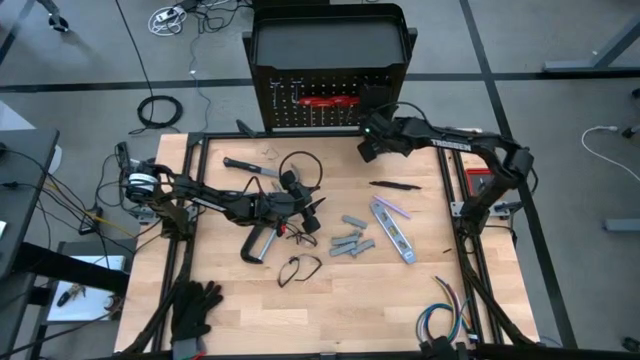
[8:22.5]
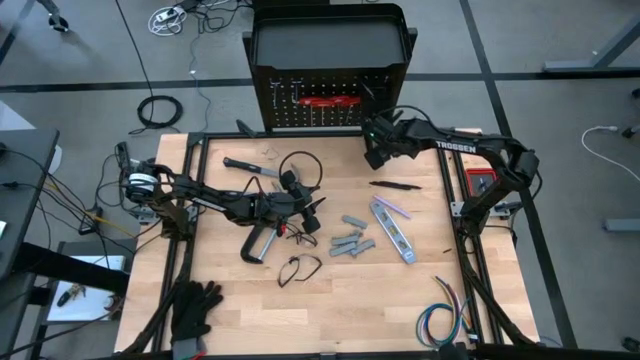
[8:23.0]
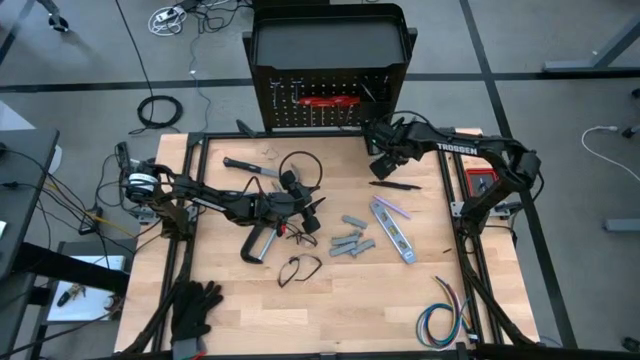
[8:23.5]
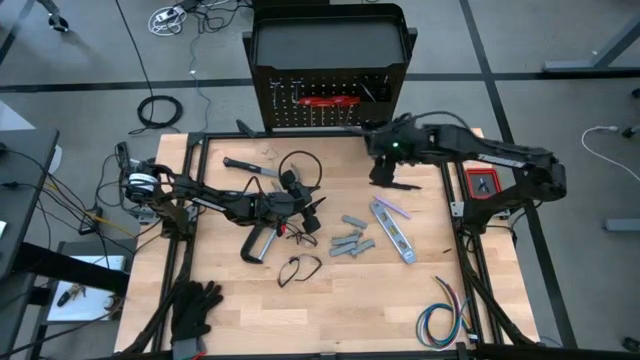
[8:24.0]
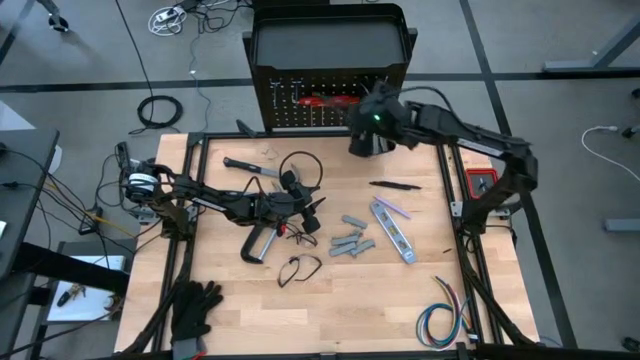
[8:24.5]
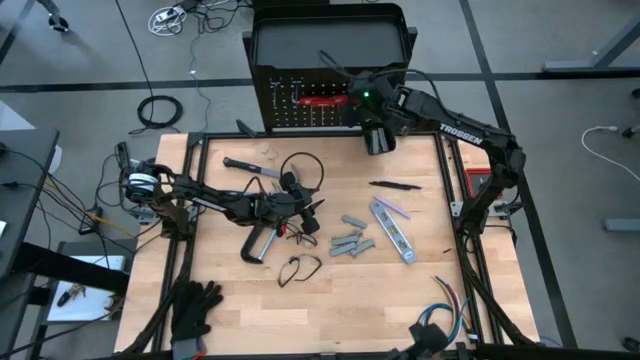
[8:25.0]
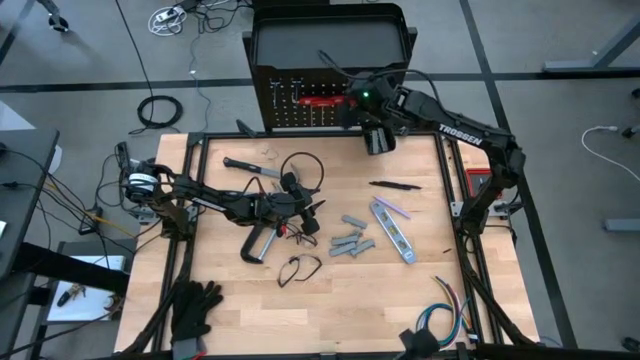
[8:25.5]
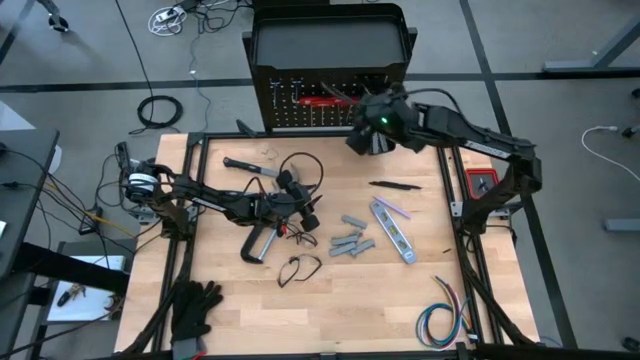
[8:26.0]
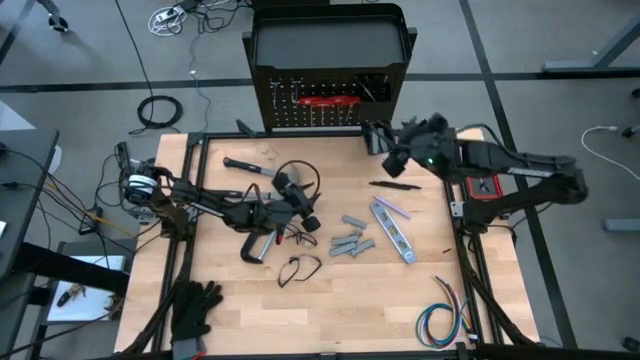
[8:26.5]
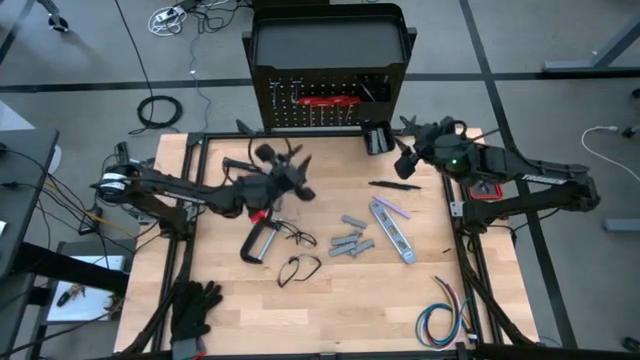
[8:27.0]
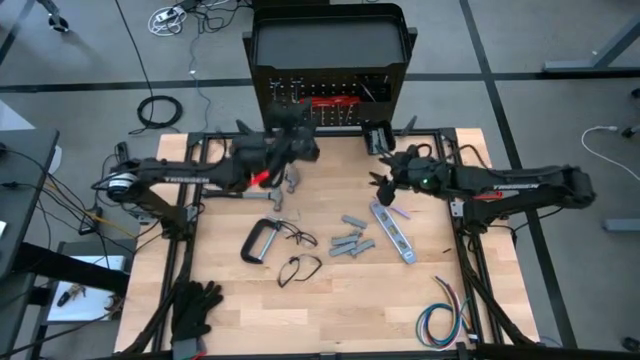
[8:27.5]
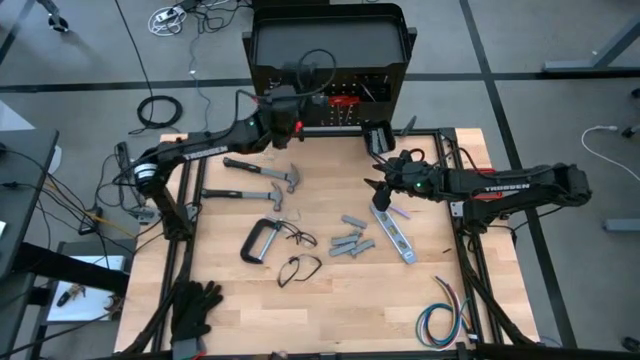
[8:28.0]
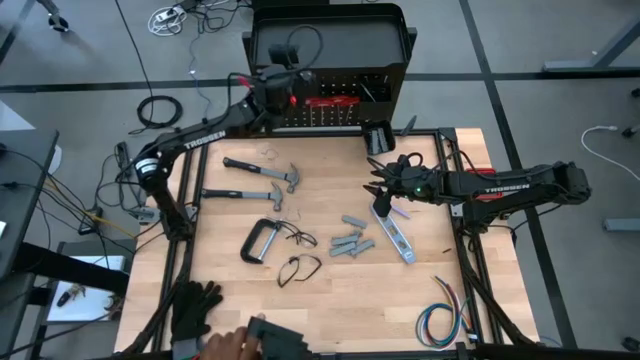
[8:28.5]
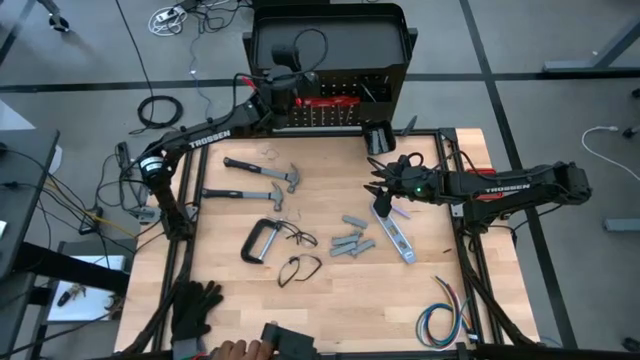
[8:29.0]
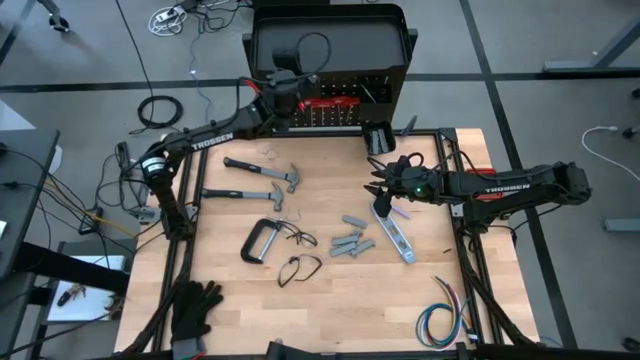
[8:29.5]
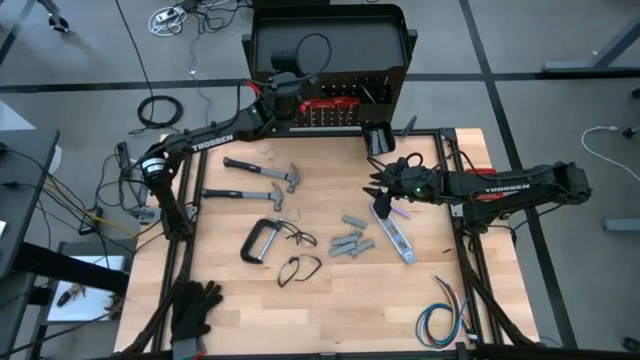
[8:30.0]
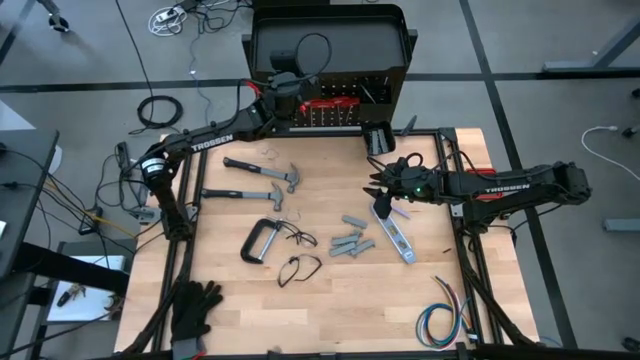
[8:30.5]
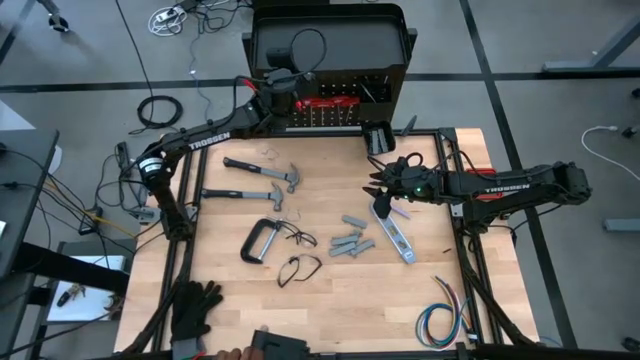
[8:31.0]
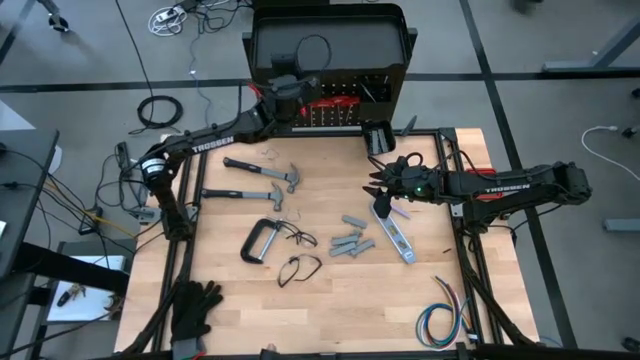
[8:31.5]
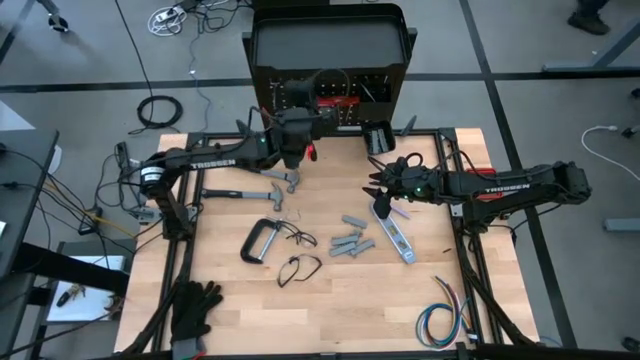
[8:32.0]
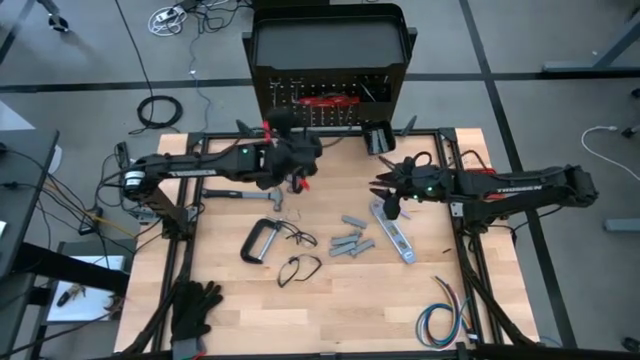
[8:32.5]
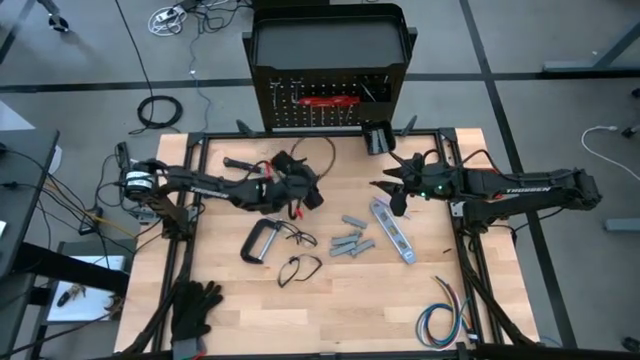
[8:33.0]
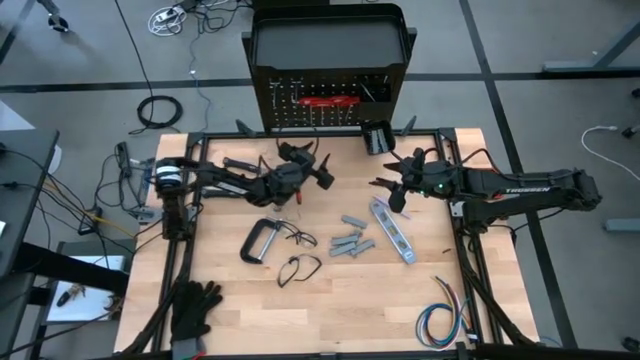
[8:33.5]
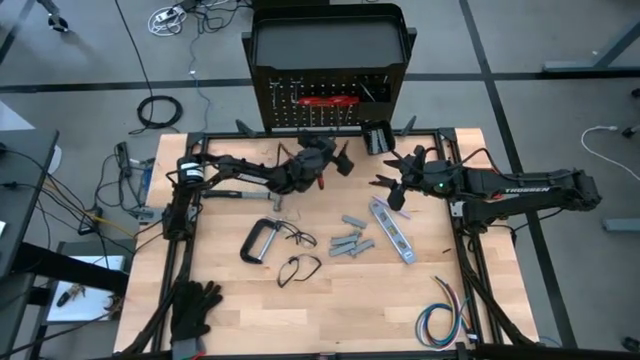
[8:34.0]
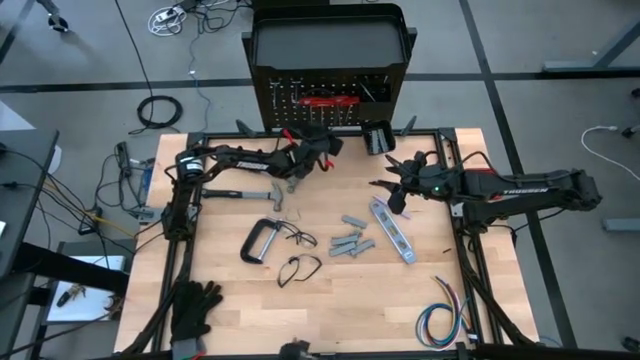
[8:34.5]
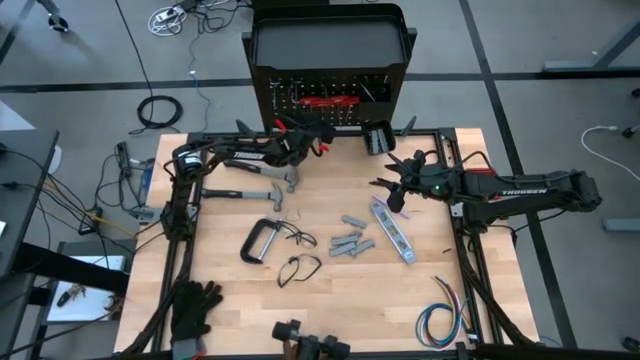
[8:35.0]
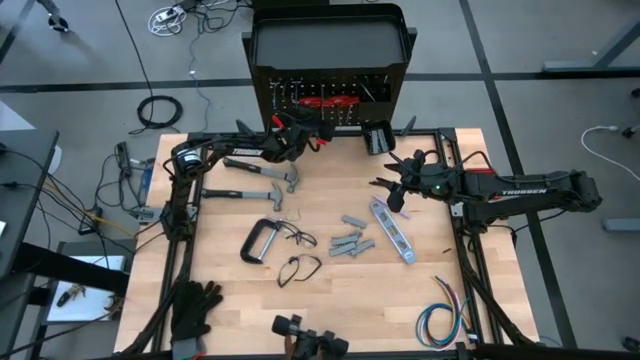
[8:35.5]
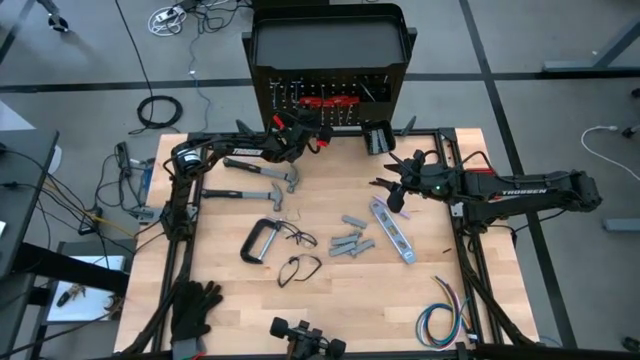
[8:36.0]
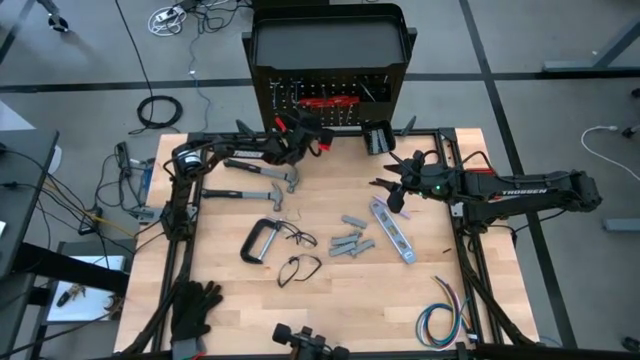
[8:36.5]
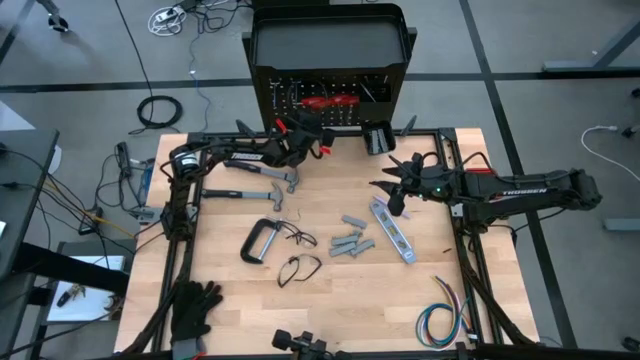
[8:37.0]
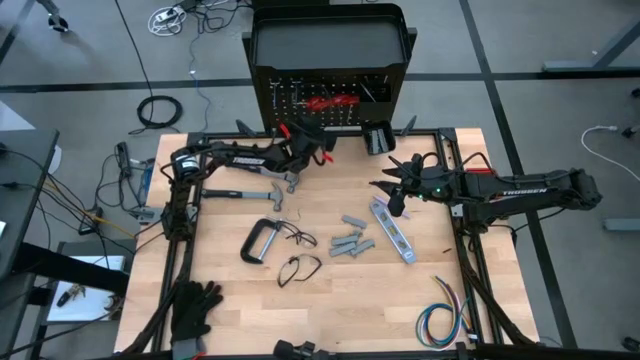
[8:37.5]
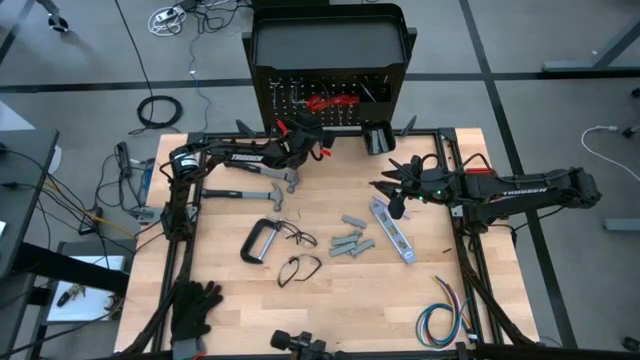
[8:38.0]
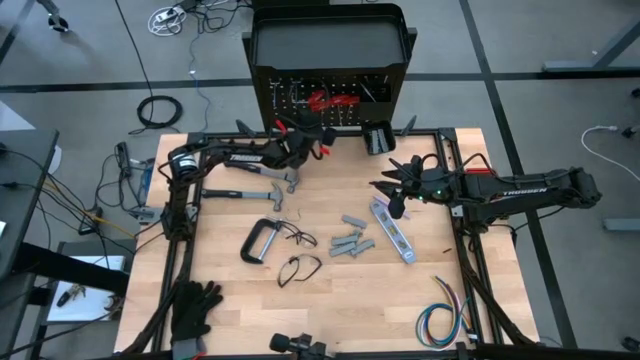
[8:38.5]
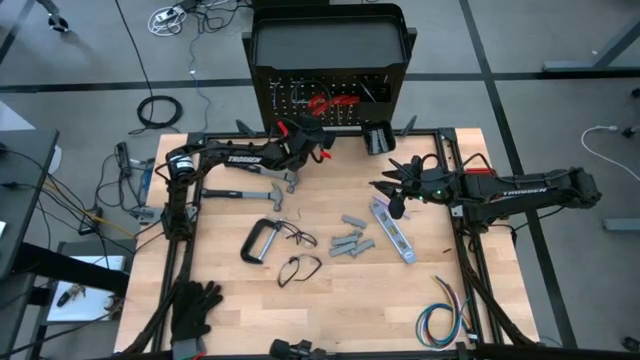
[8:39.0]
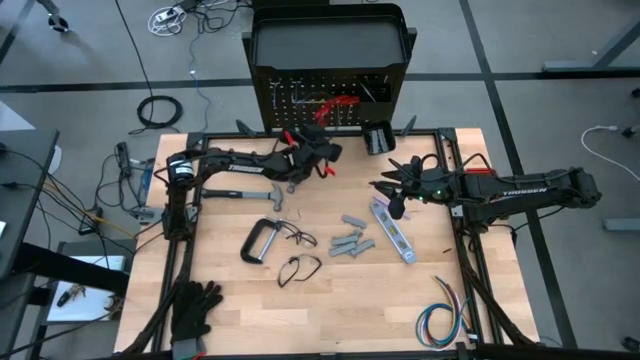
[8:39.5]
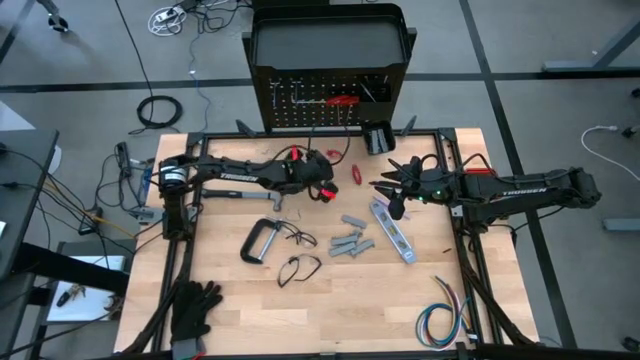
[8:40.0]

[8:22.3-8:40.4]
Task: Hang tools onto peg board
Unhang the T-shaped metric hex key

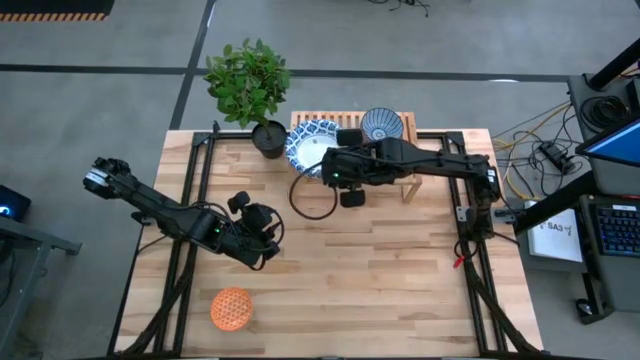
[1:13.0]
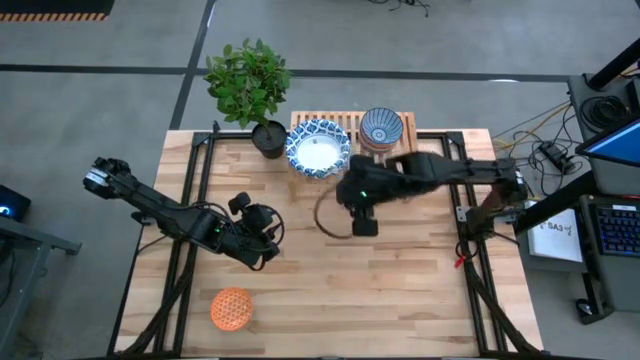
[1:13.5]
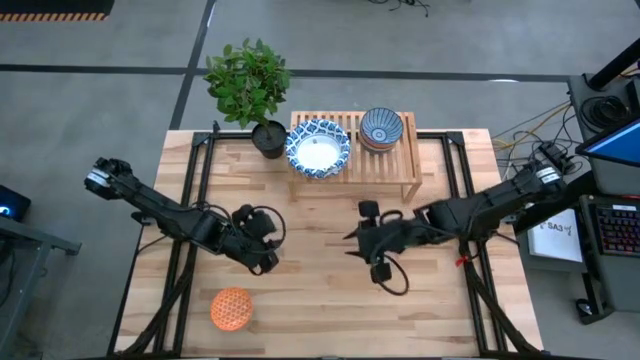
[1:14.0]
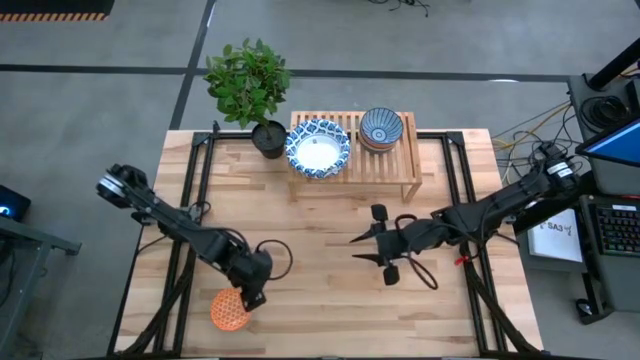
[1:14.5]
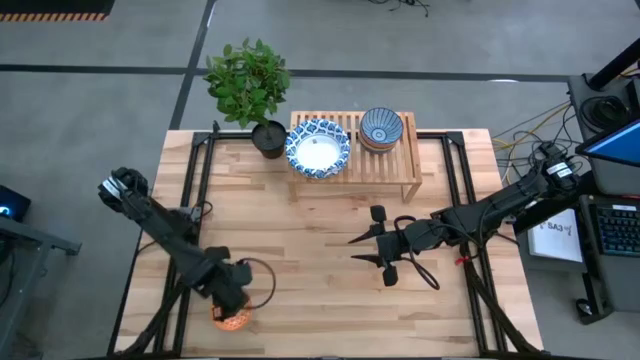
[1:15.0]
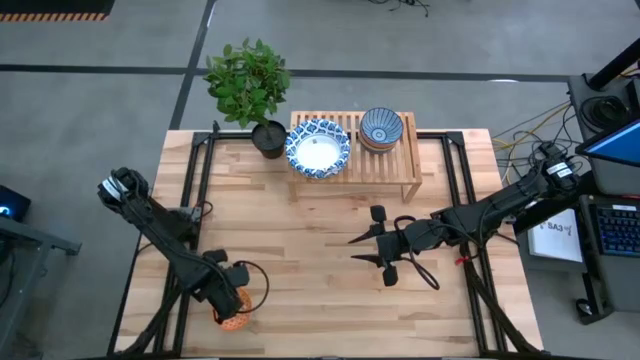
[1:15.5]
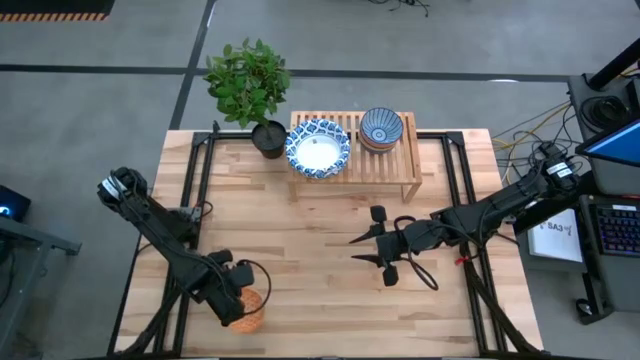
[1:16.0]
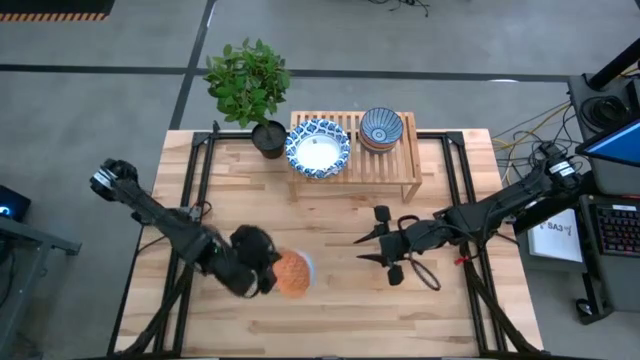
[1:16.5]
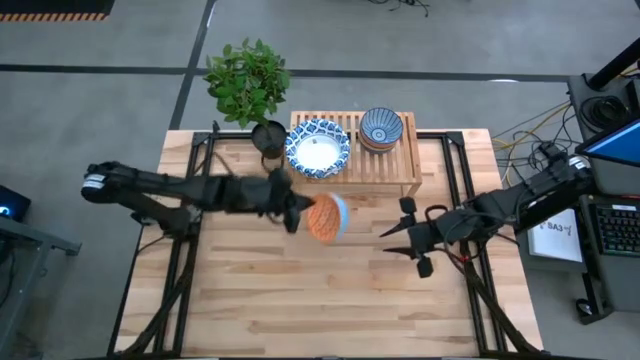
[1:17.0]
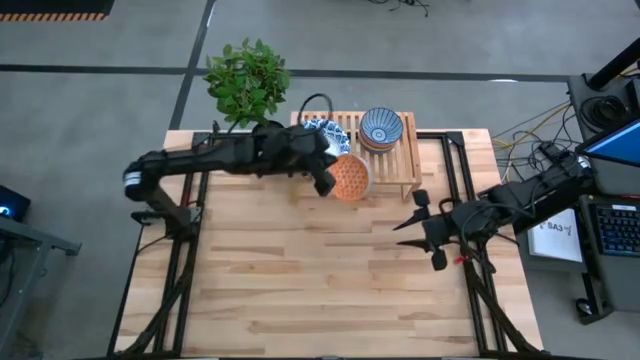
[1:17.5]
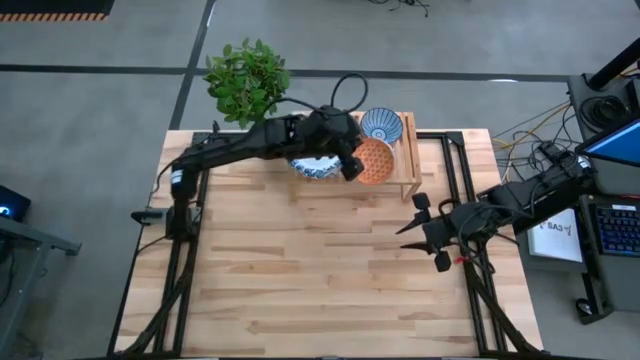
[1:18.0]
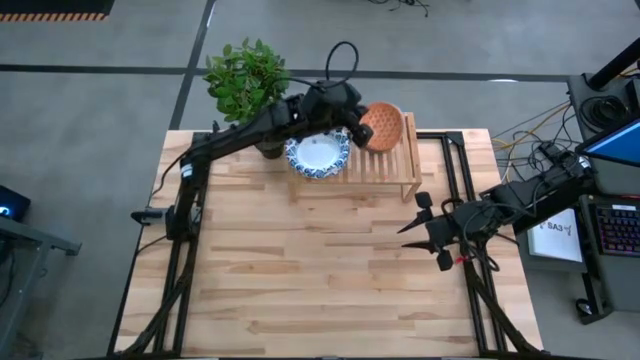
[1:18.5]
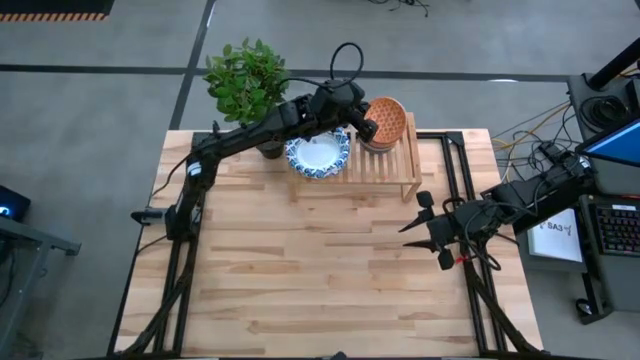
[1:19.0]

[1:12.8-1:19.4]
Task: Place and stack bowls onto a shelf
Stack the orange bowl on top of the blue bowl on the shelf
